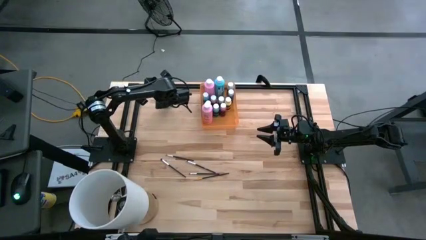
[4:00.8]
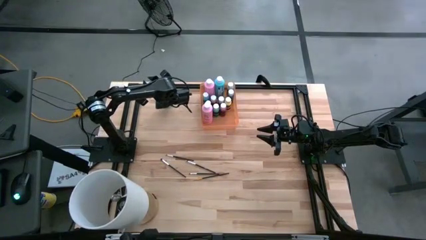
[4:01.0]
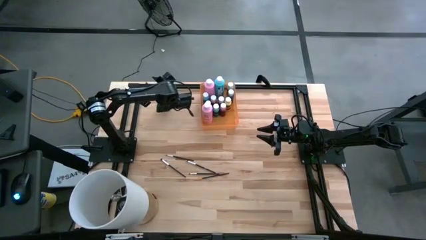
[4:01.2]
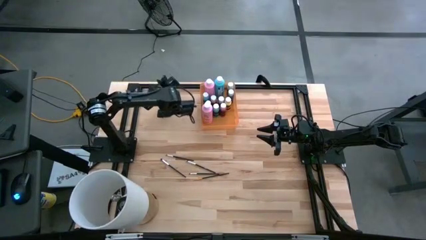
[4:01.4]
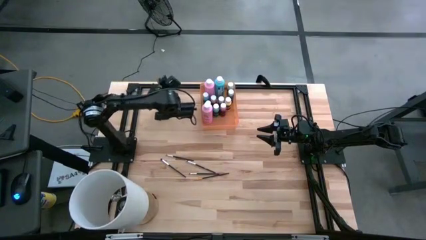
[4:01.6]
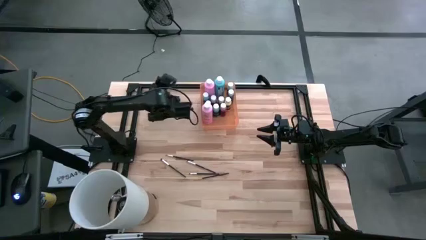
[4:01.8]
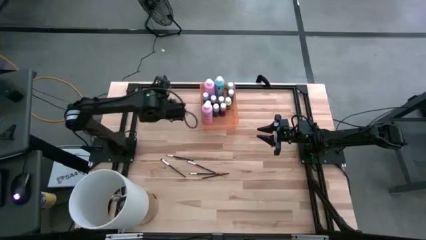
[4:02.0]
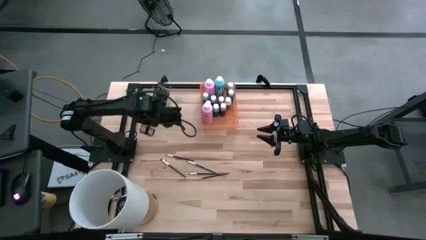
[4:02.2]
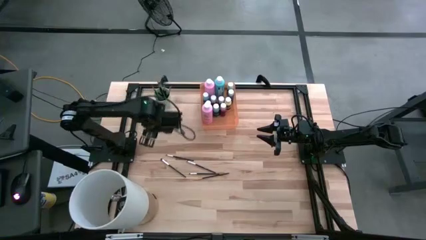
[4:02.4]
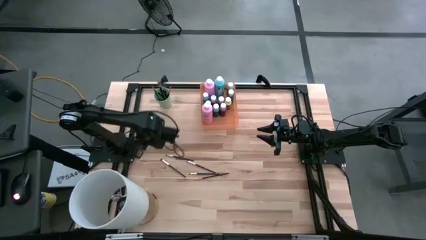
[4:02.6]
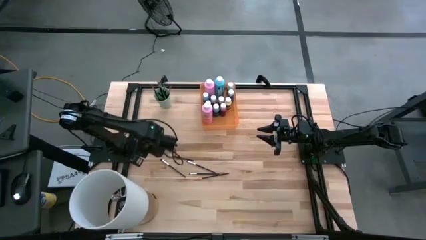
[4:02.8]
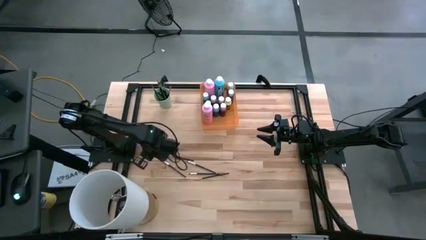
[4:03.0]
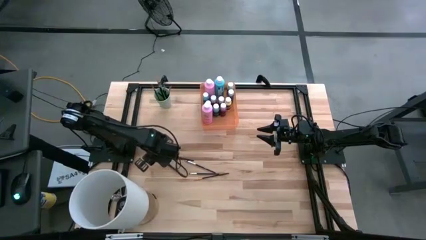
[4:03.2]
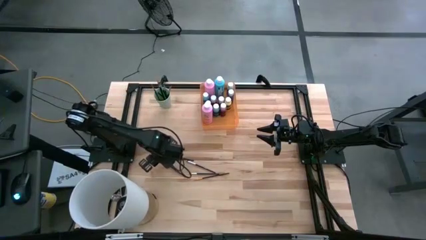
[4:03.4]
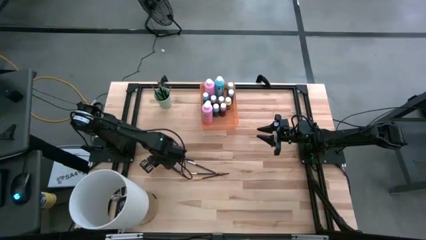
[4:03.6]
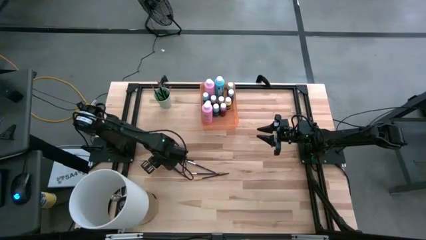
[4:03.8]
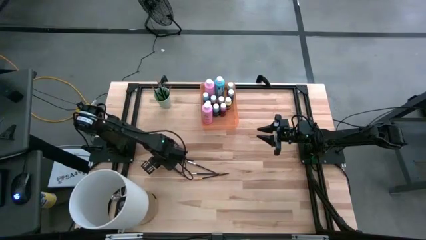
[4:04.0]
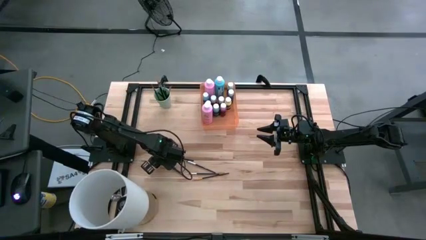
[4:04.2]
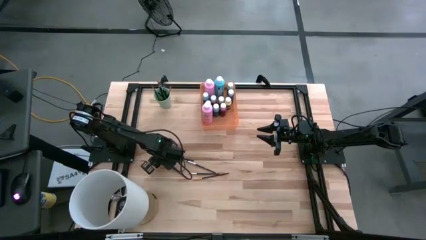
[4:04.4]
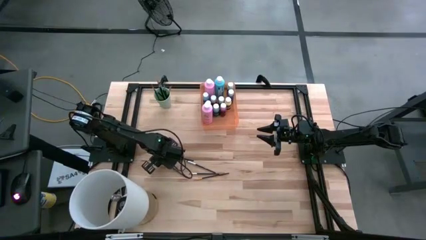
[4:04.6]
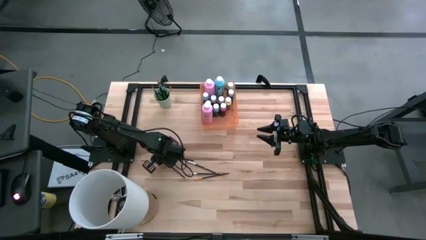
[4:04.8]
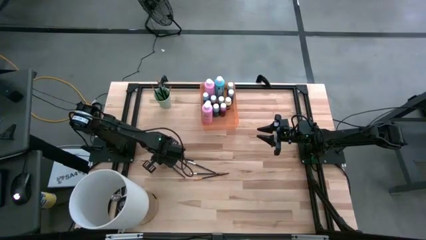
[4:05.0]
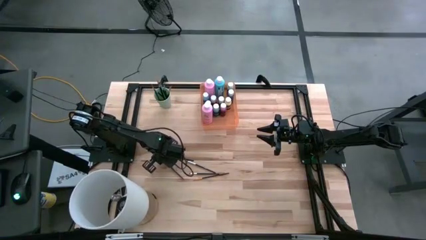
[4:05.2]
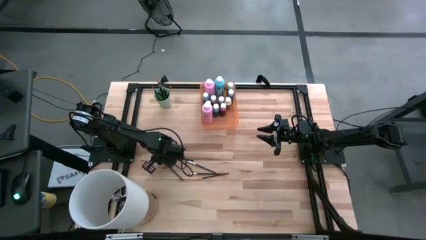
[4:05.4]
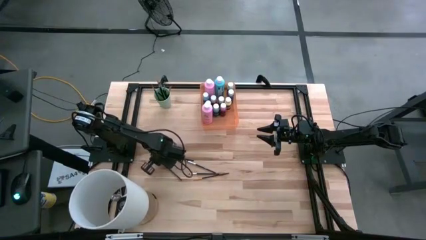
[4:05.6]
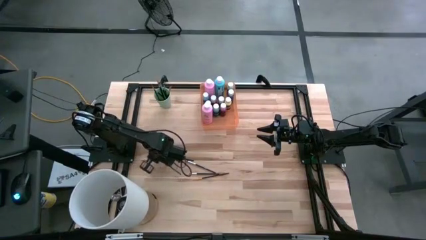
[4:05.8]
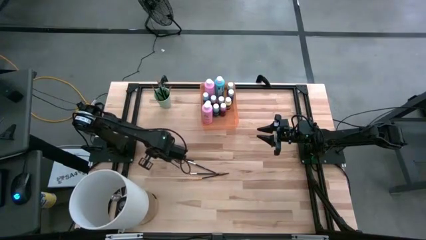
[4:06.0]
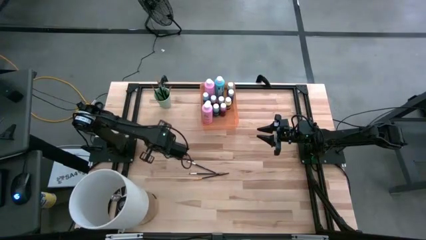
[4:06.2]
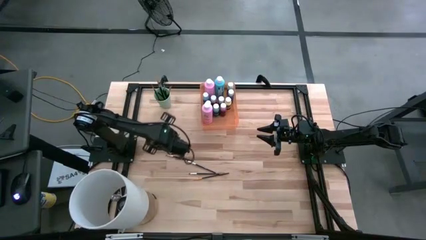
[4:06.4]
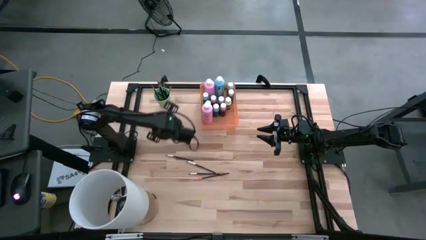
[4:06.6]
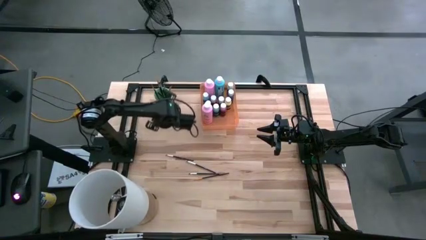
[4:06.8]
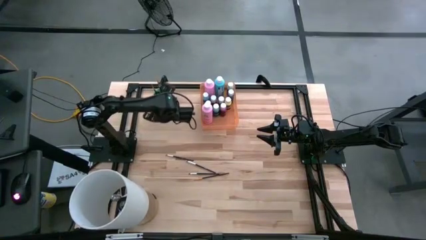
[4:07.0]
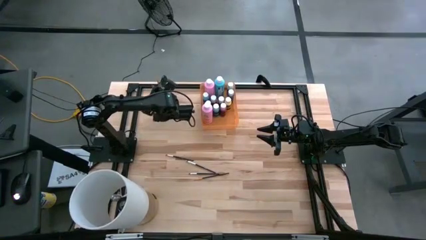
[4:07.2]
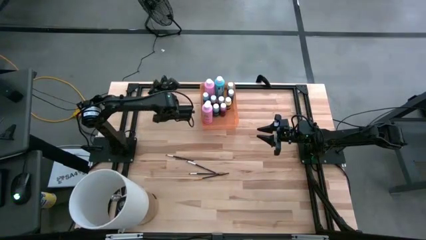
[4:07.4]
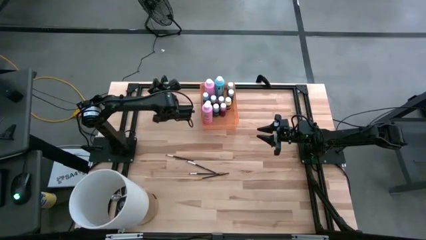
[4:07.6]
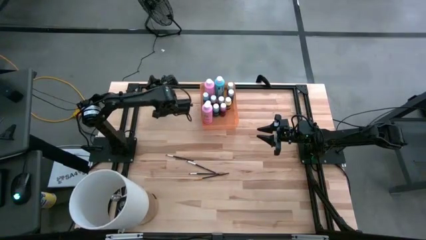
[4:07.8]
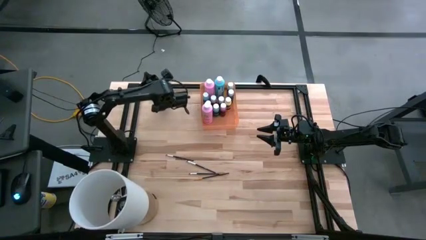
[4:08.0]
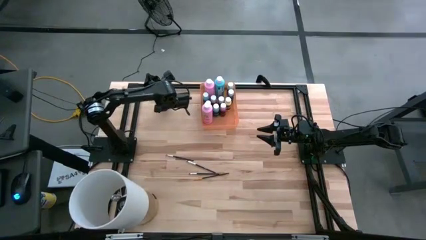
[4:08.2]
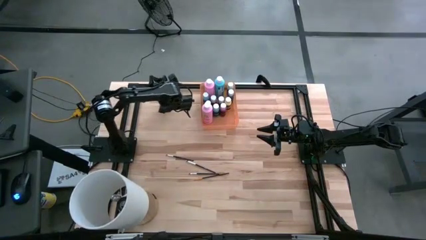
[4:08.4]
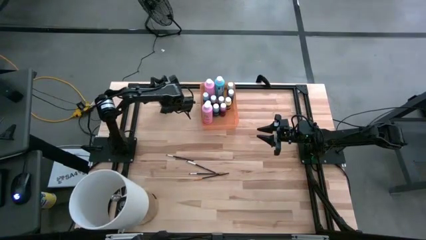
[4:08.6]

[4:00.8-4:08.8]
Task: Pick & Place Paint Supplies
Put the white paintbrush into the cup

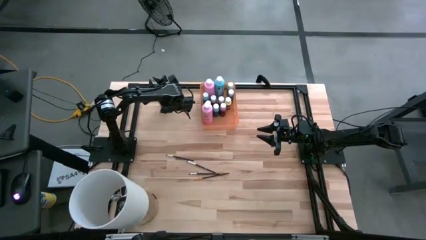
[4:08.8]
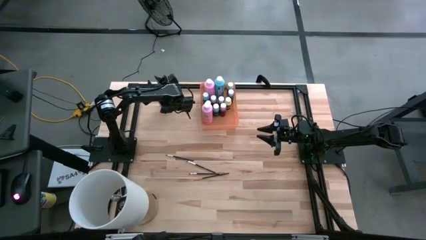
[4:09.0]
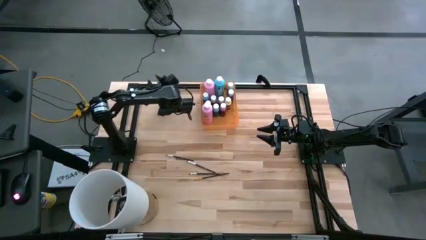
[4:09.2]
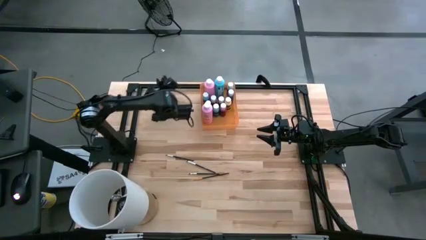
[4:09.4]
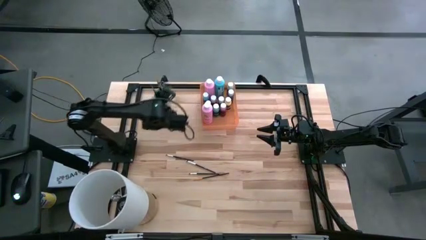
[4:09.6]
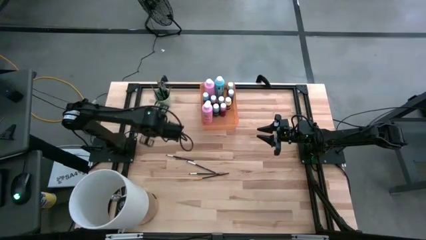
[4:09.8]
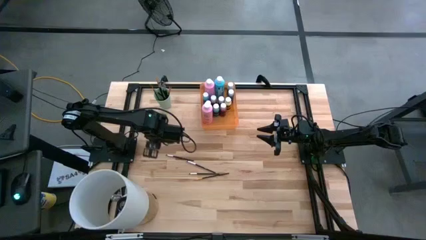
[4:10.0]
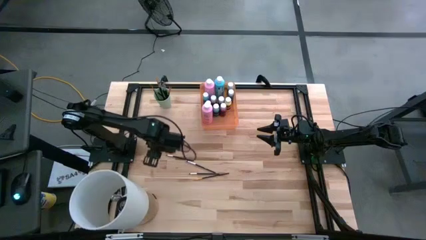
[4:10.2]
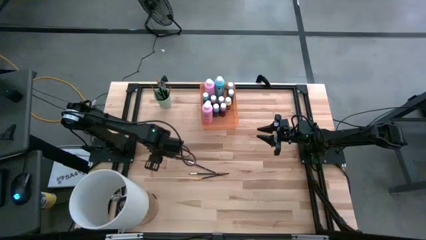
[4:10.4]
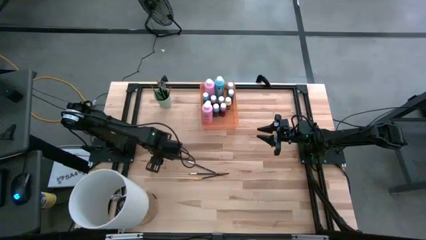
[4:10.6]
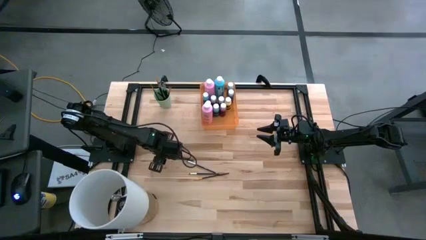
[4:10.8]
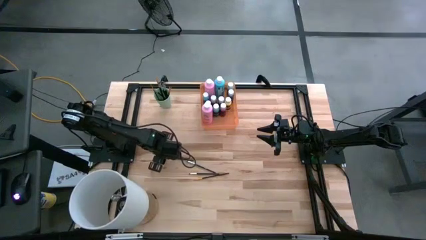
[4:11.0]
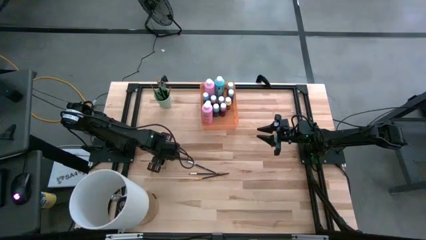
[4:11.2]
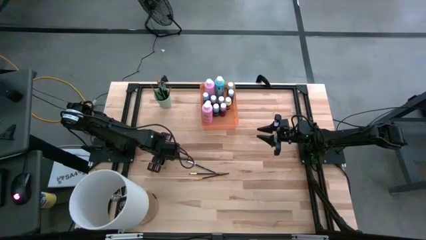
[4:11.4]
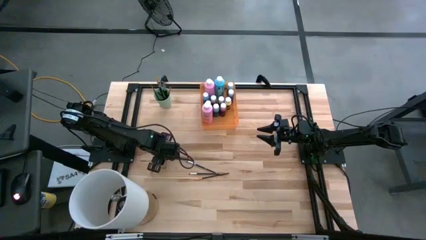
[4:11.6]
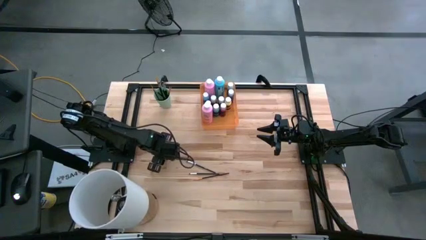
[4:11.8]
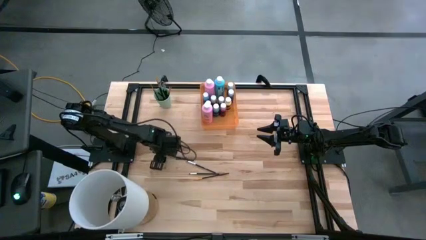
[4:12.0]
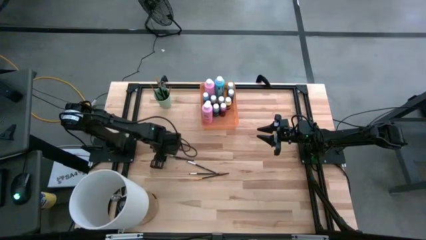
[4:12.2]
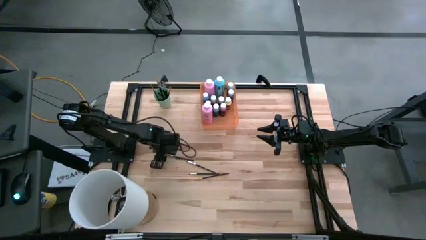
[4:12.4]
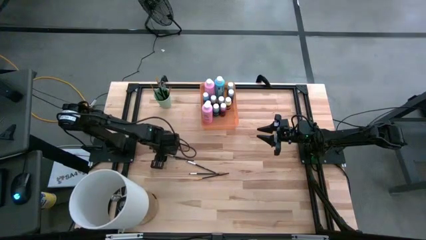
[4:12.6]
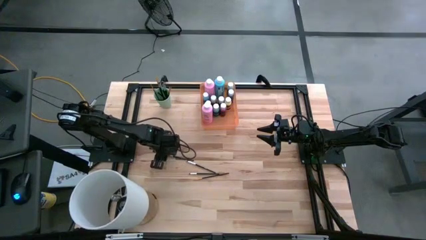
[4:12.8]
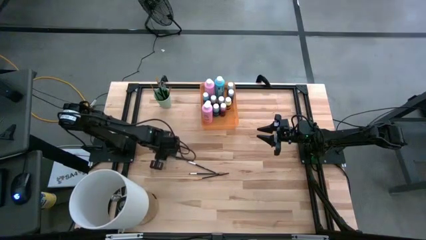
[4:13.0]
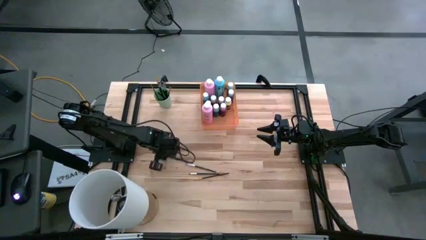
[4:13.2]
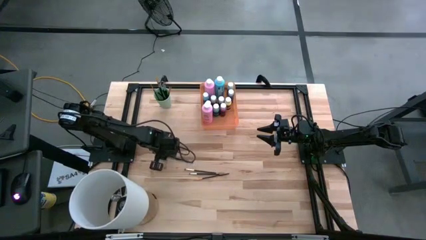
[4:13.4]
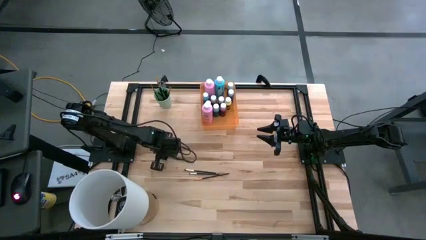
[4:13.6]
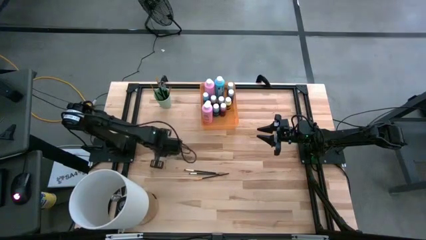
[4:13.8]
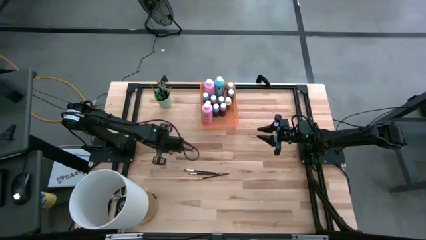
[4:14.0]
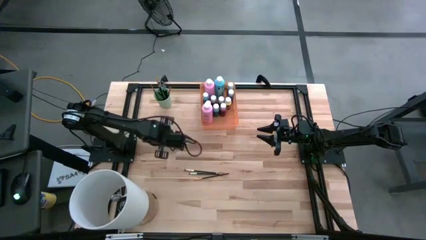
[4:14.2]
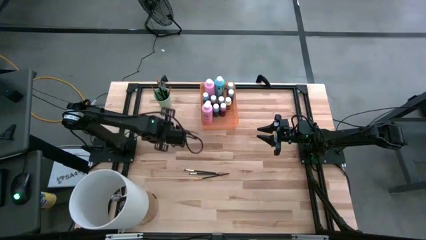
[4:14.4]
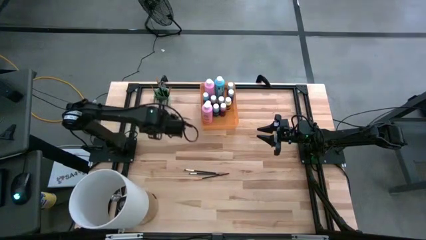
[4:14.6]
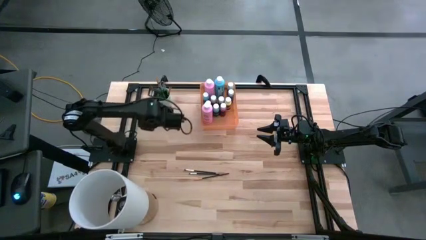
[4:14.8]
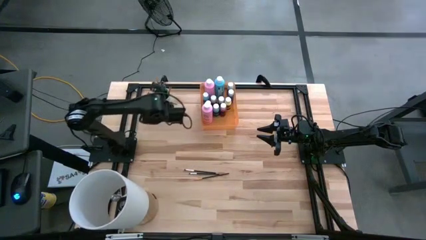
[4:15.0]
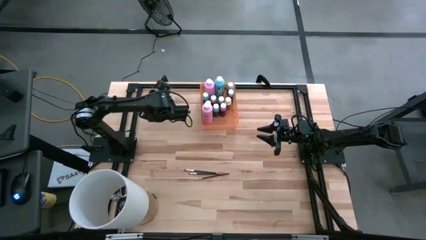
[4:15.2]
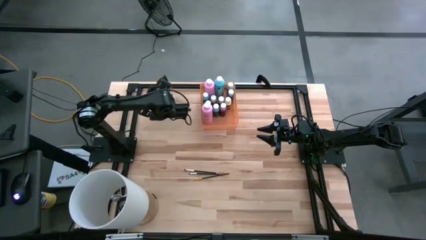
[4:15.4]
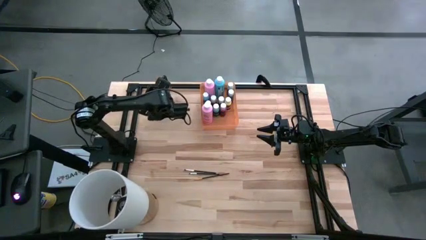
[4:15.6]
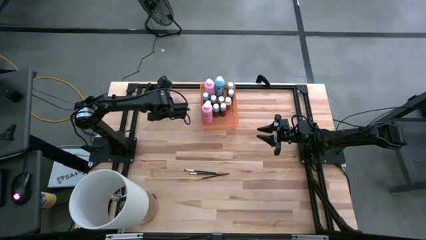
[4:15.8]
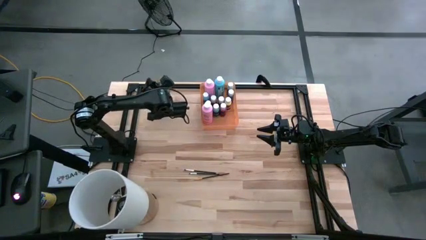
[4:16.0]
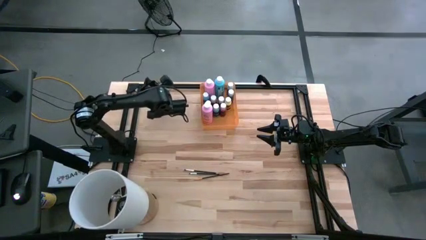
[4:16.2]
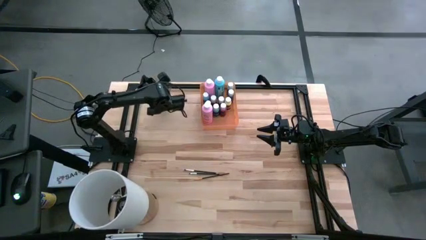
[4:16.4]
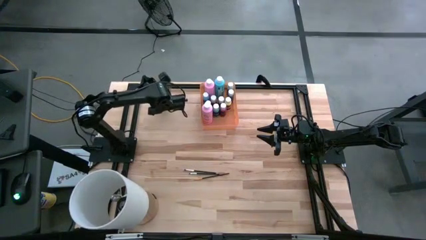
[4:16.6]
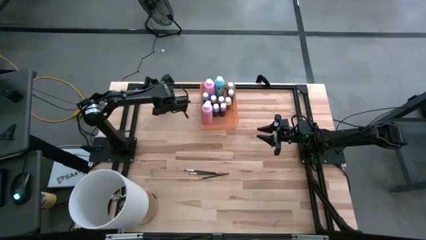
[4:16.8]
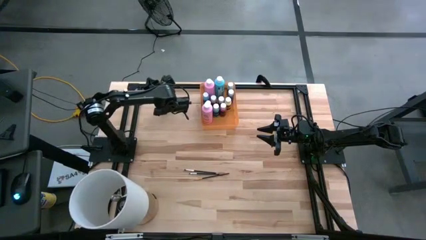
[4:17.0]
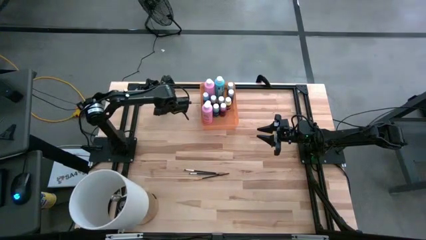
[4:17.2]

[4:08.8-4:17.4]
Put the white paintbrush into the cup
